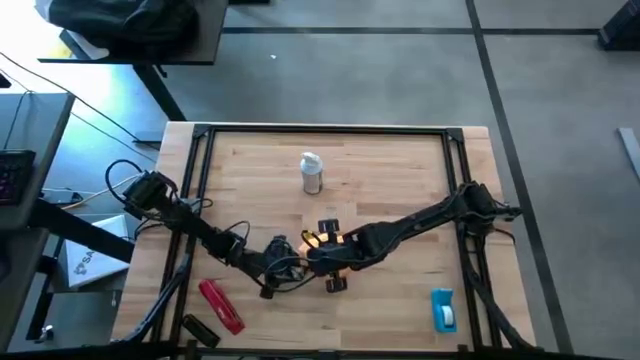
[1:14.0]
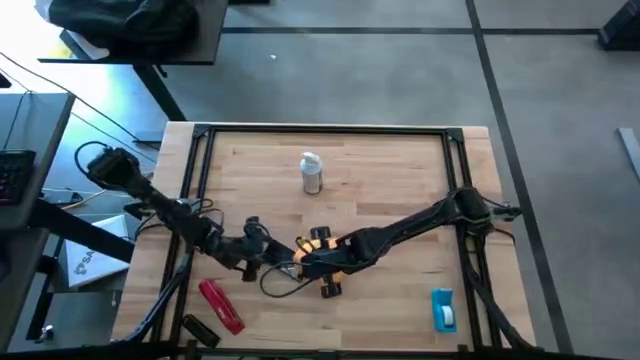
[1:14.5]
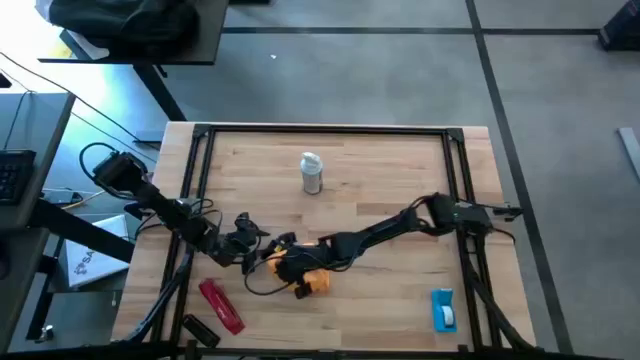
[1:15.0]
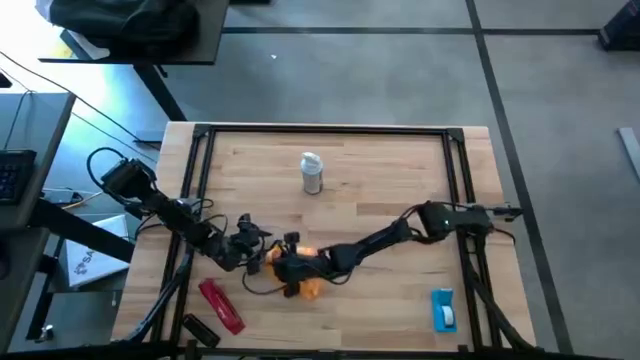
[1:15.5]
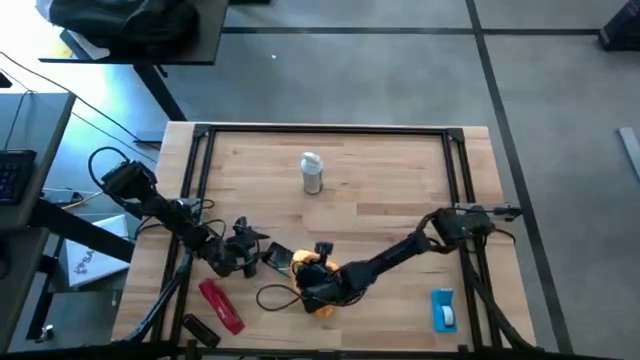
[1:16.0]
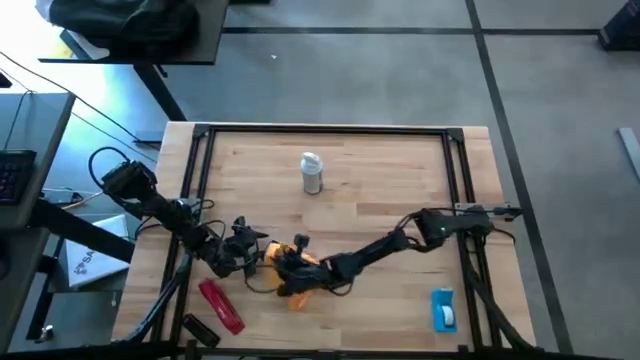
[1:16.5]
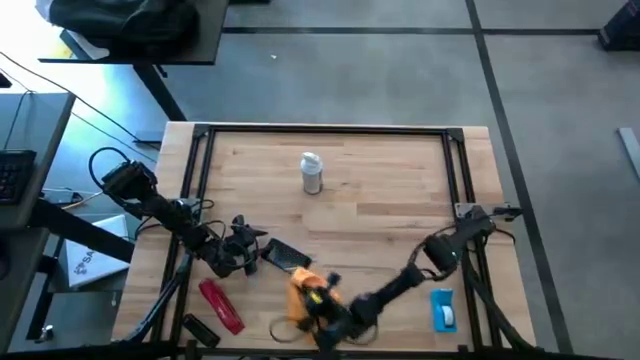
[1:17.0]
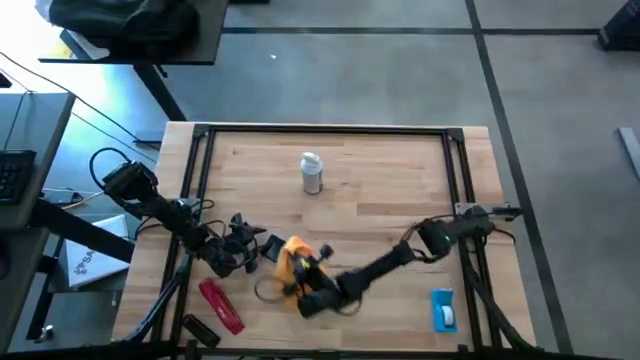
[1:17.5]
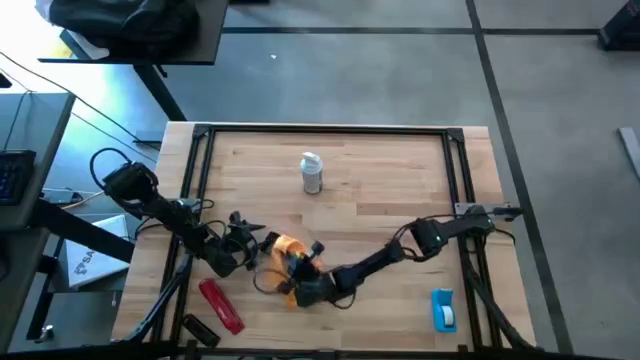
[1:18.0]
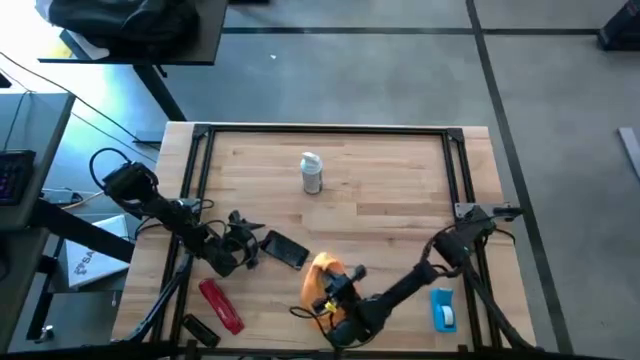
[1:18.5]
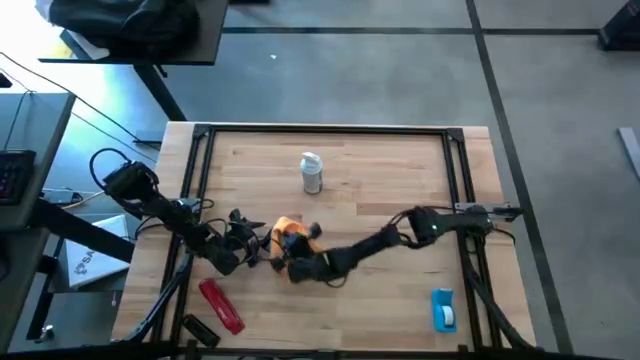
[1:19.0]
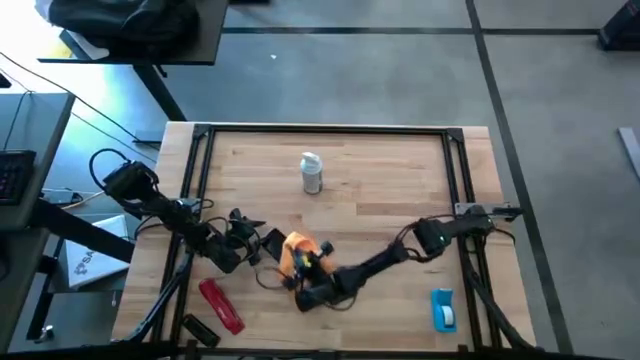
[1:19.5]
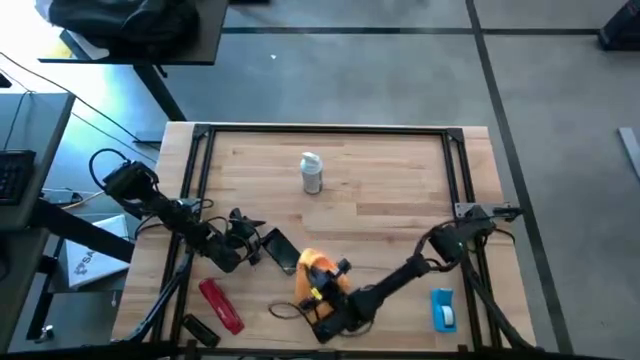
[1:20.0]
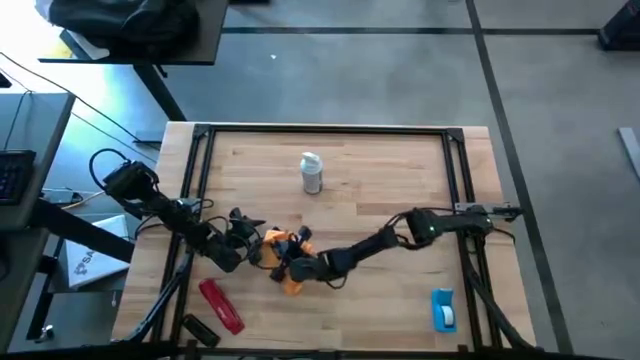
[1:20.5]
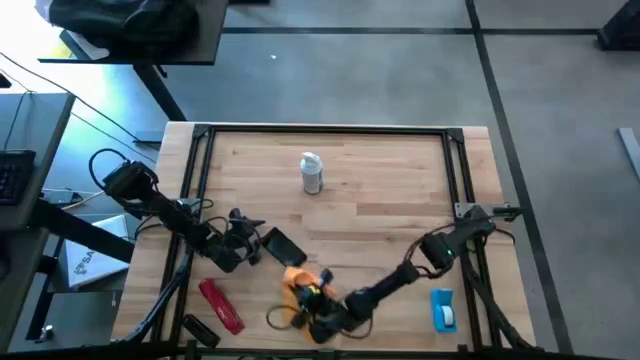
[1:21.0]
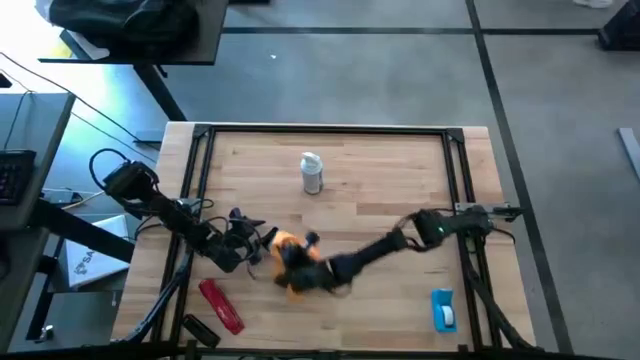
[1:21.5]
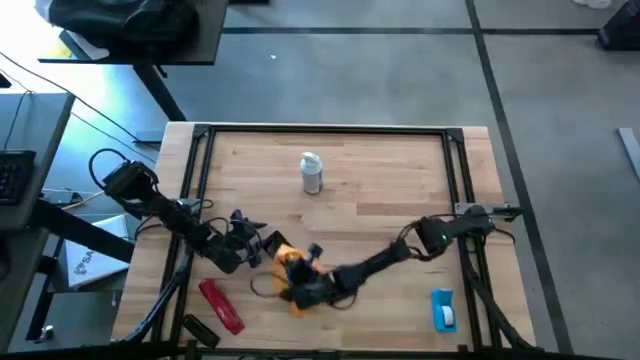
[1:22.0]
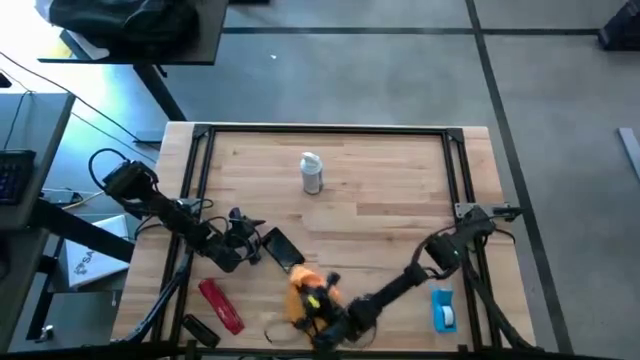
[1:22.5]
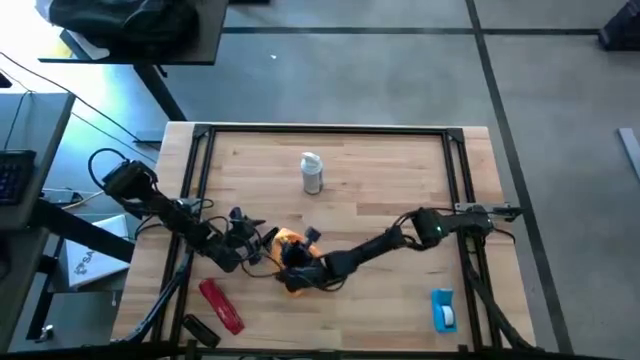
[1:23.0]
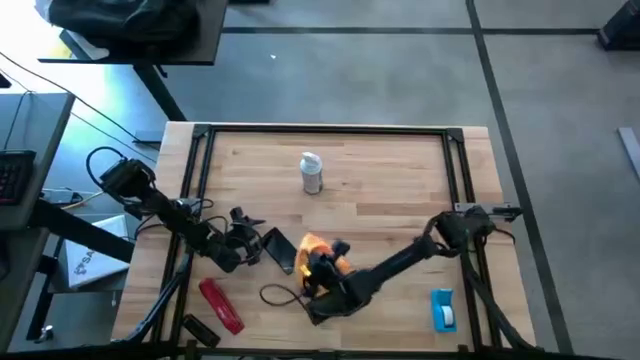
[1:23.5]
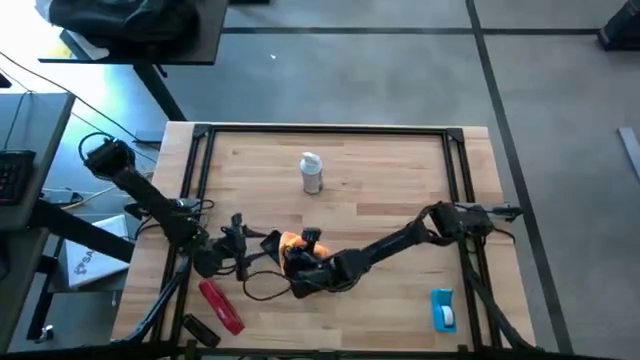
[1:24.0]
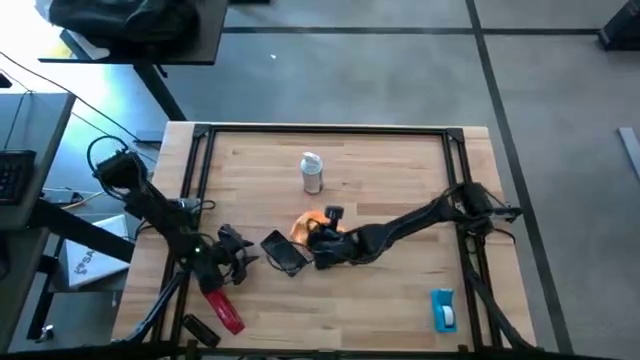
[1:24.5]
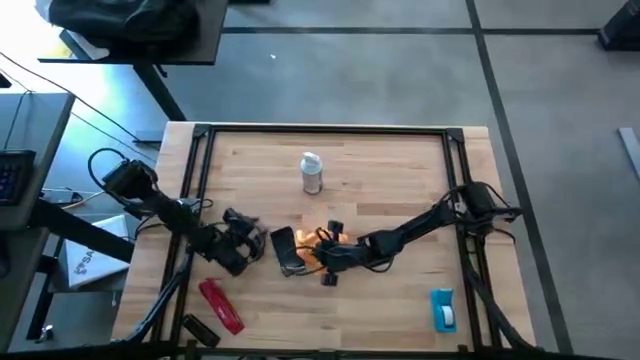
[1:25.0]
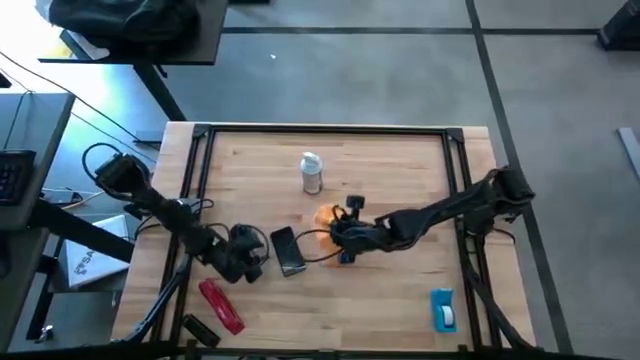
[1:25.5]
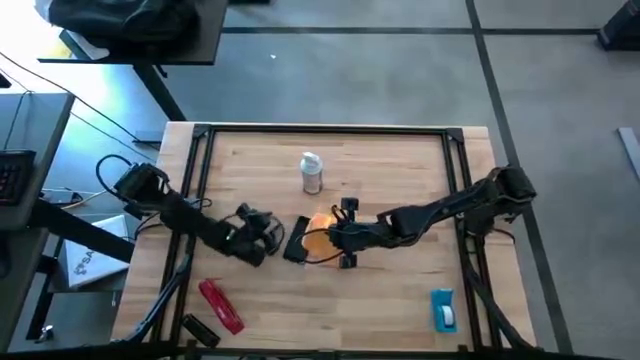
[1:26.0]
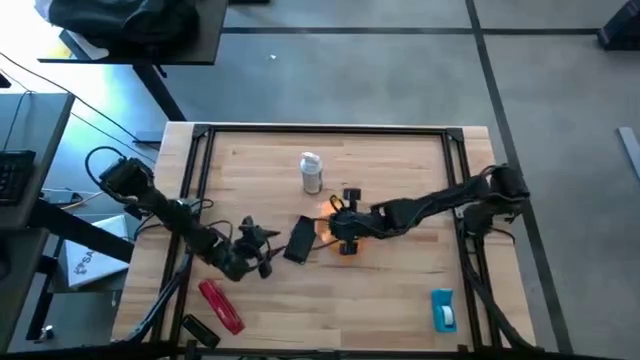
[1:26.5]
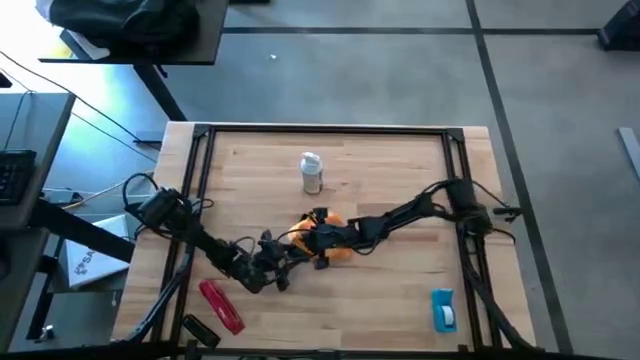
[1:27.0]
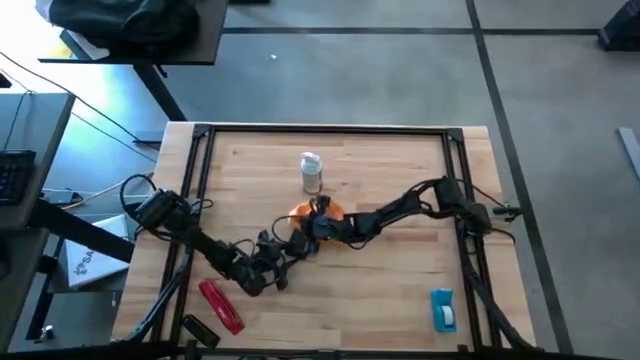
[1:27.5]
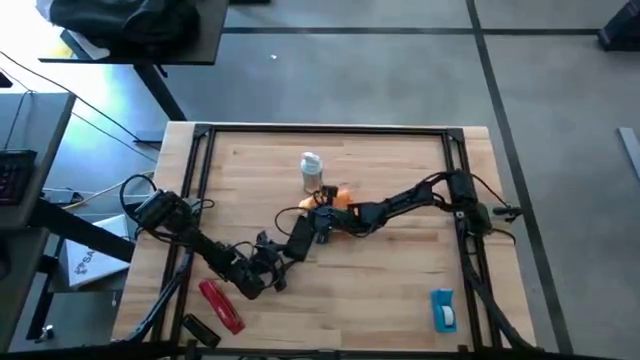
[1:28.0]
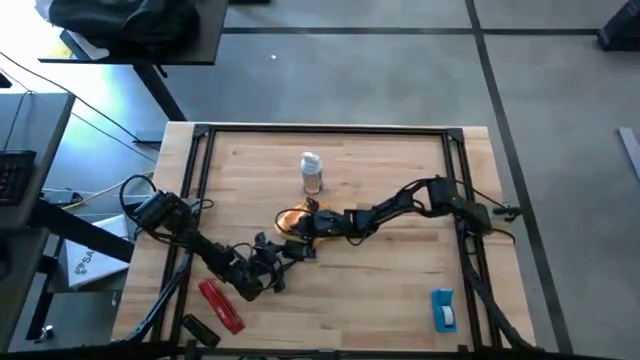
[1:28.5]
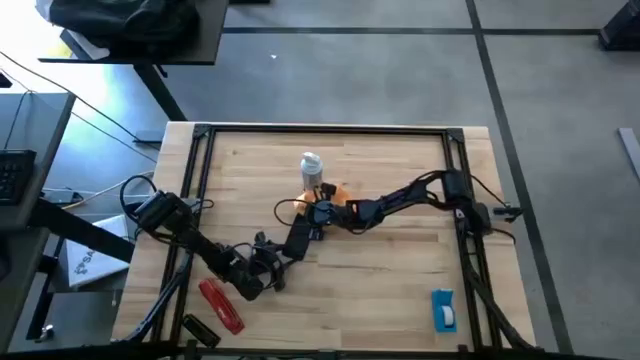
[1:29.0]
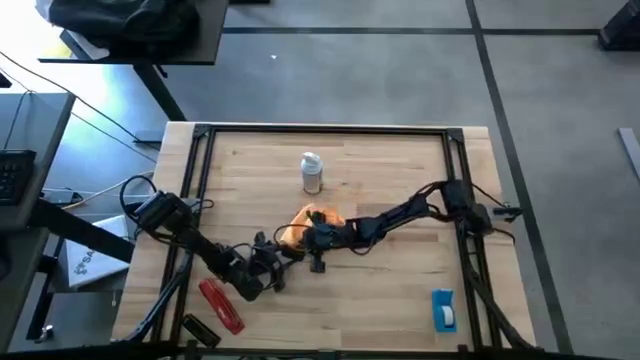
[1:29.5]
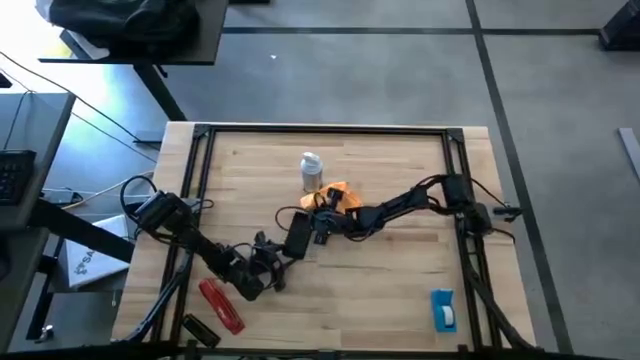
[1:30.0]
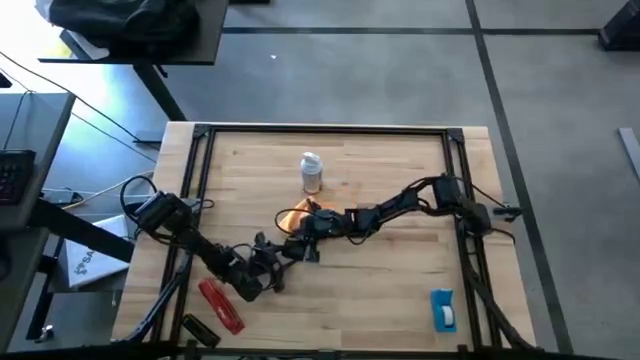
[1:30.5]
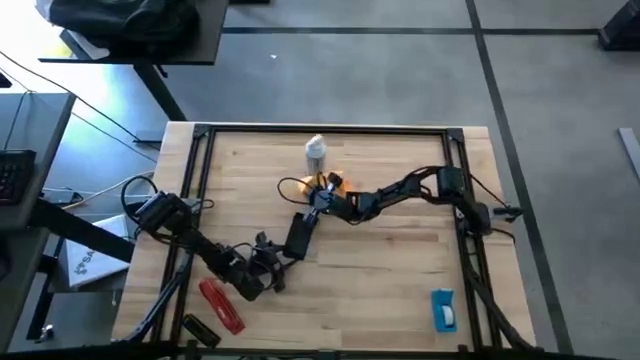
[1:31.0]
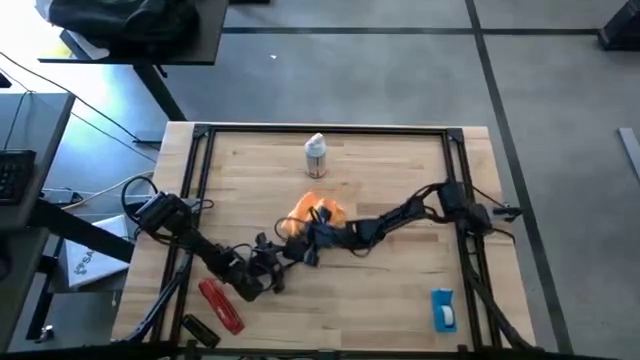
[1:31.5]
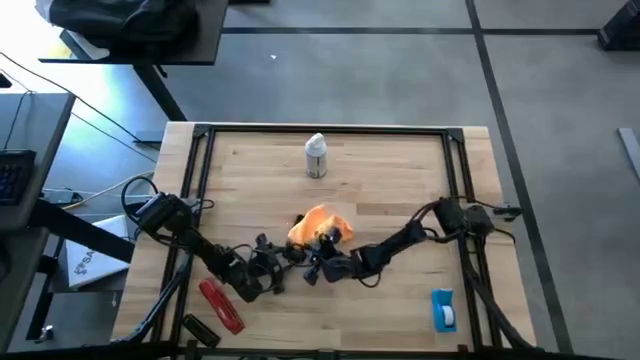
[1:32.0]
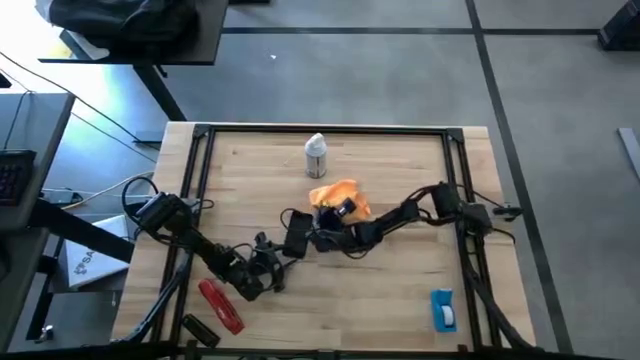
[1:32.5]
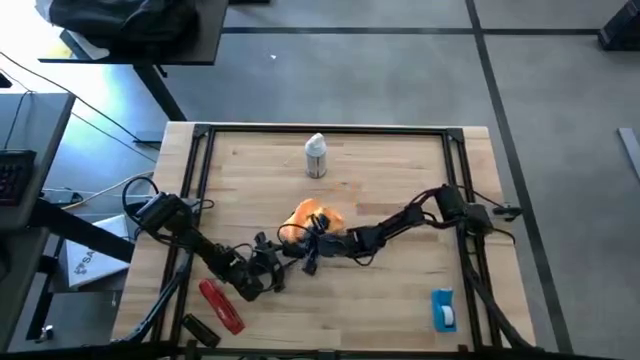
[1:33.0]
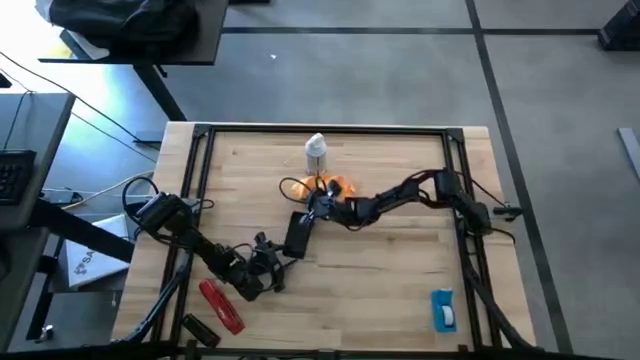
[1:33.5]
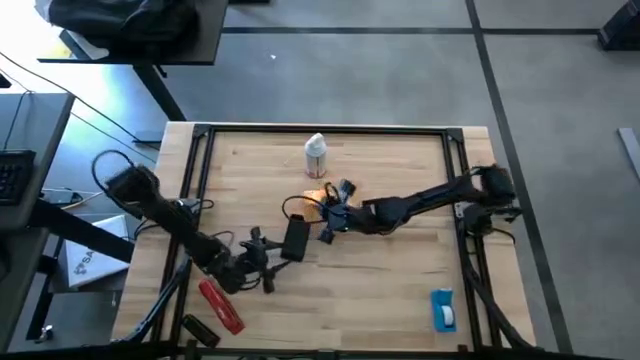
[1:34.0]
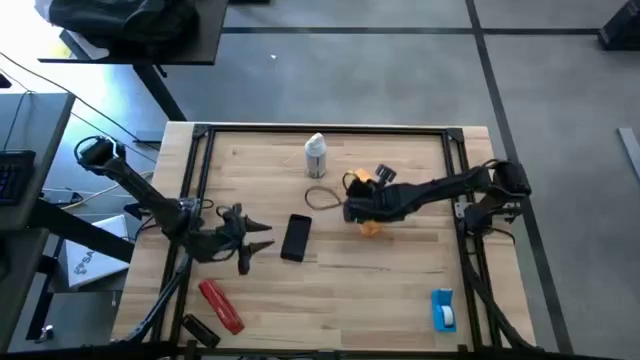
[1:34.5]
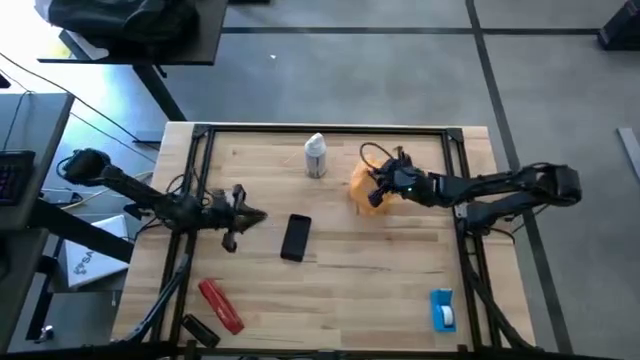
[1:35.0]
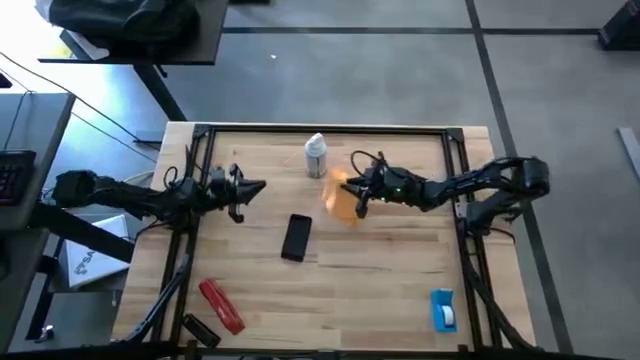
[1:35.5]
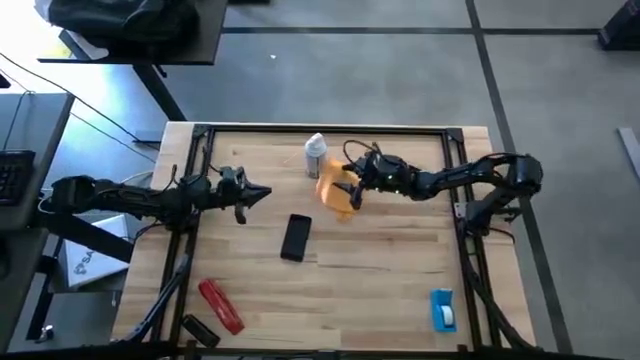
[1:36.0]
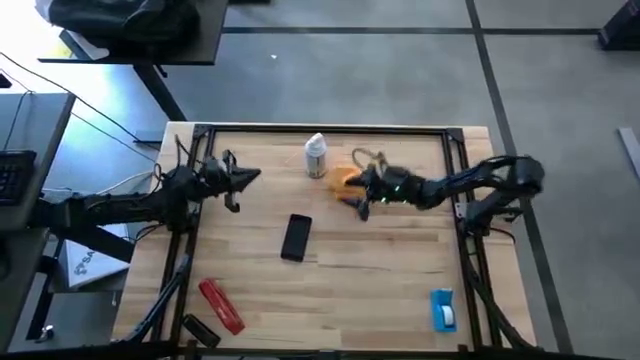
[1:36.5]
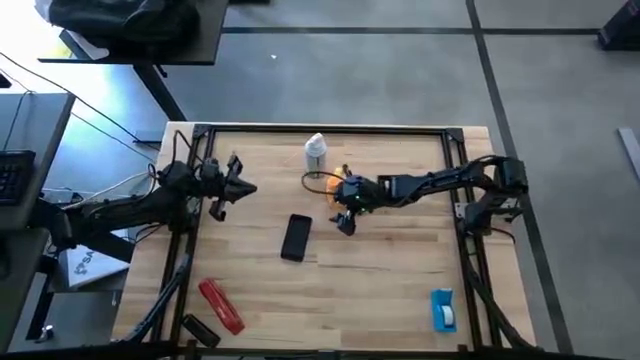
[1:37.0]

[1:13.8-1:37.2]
Task: Apply microfiber cloth
Wipe the front and back of the cellphone with the yellow microfiber cloth
